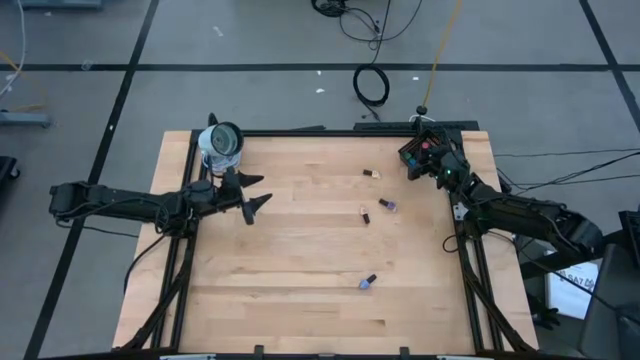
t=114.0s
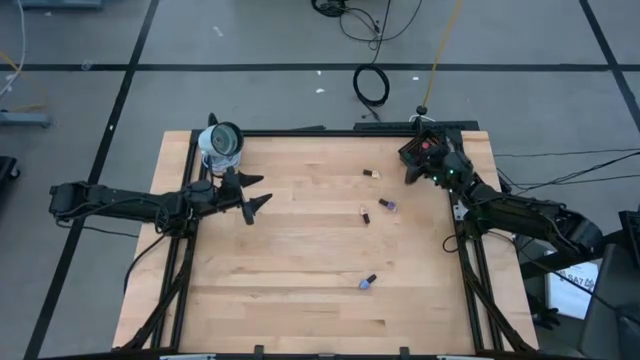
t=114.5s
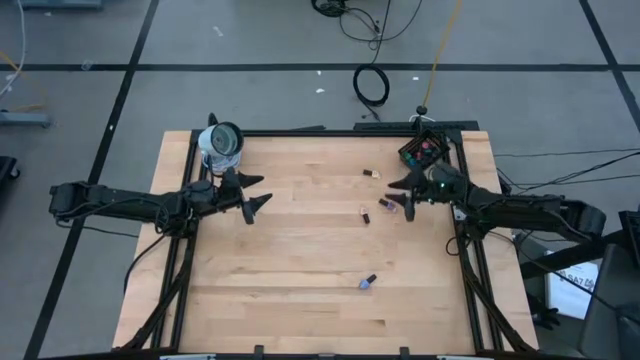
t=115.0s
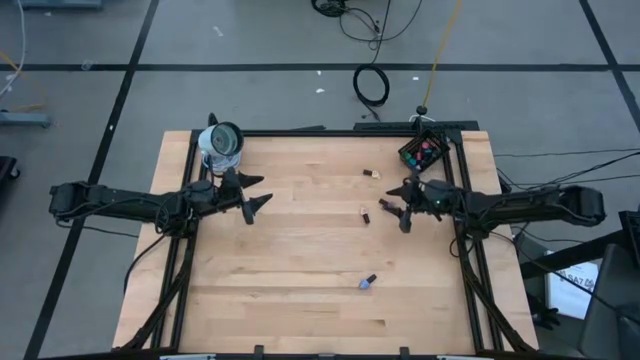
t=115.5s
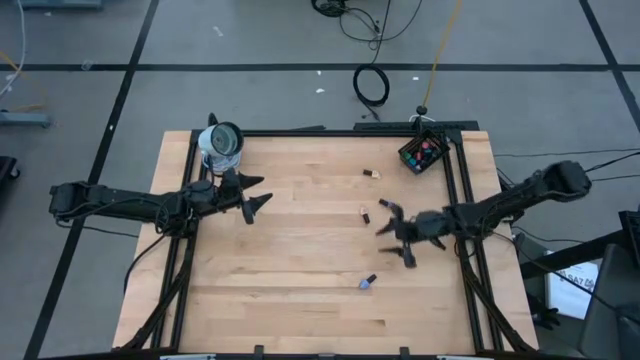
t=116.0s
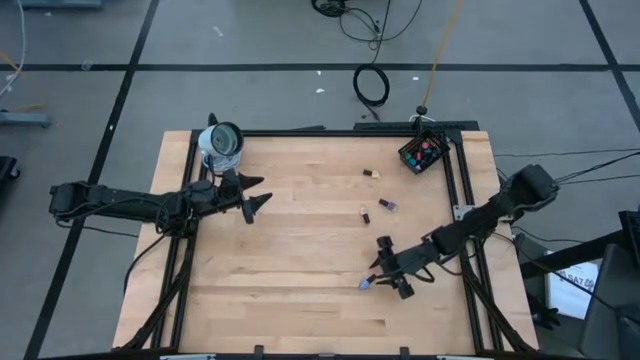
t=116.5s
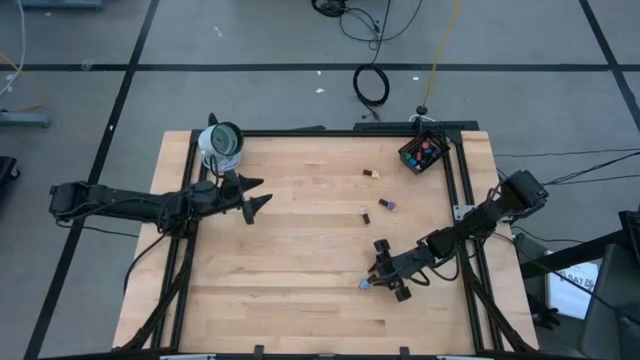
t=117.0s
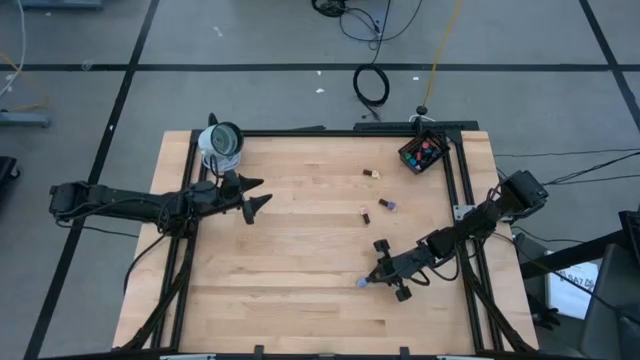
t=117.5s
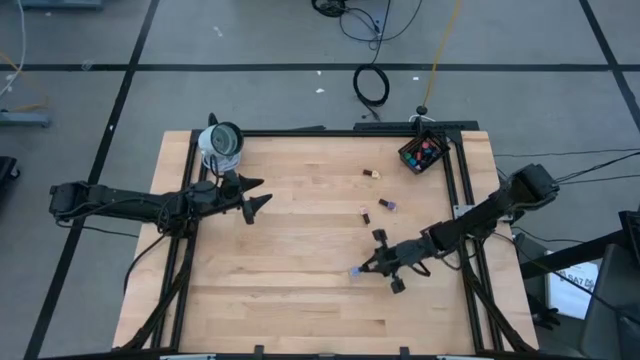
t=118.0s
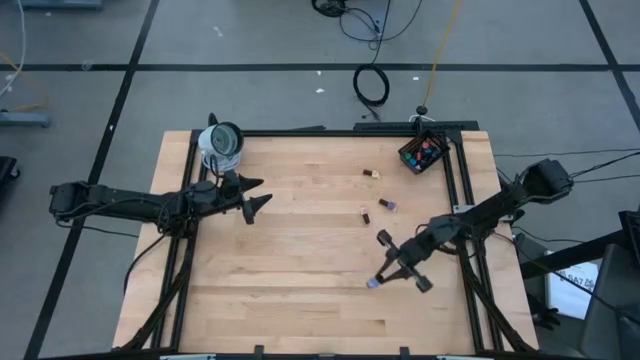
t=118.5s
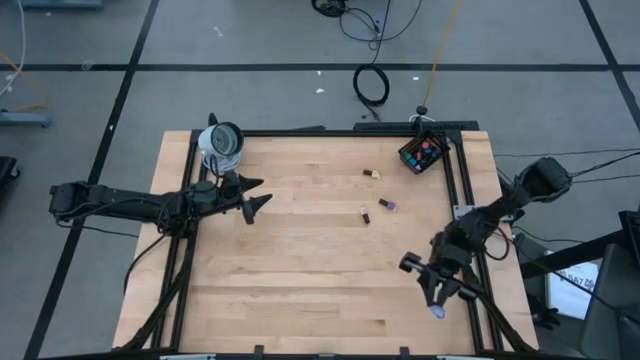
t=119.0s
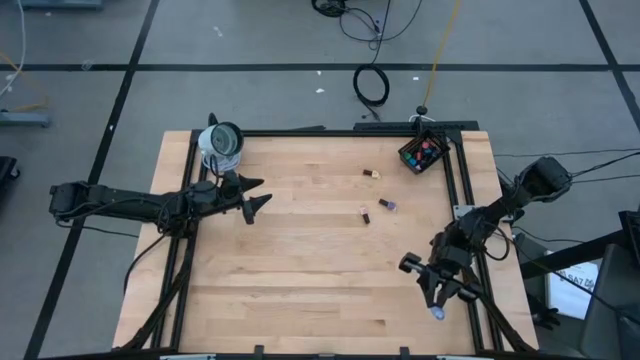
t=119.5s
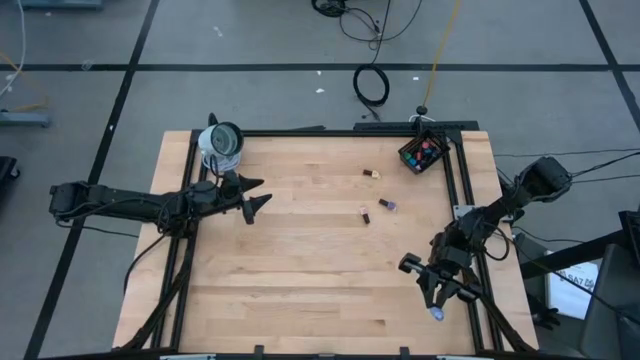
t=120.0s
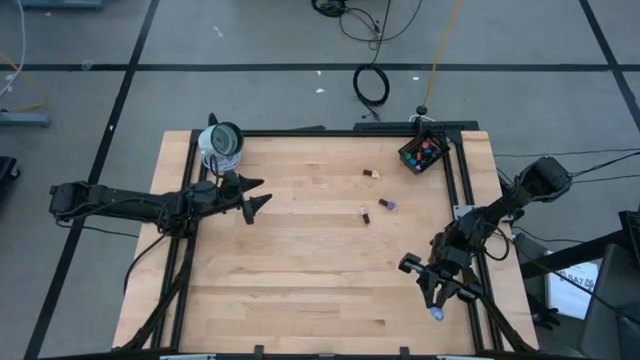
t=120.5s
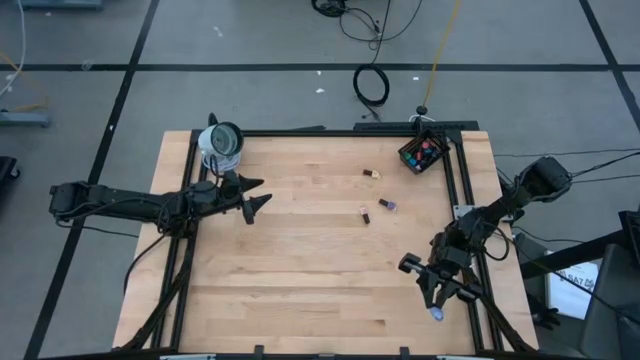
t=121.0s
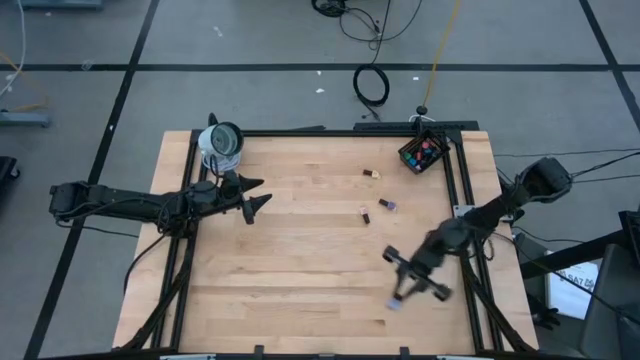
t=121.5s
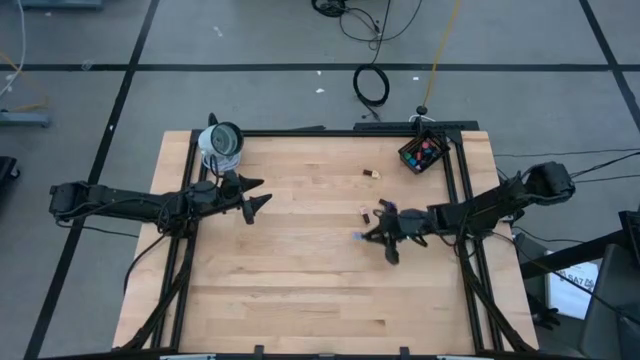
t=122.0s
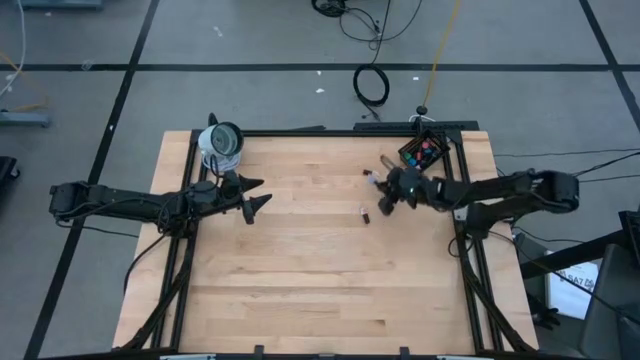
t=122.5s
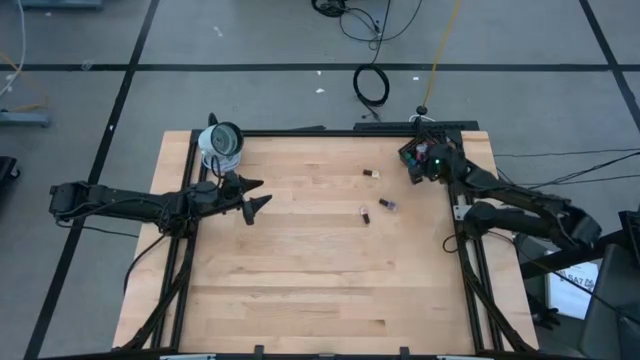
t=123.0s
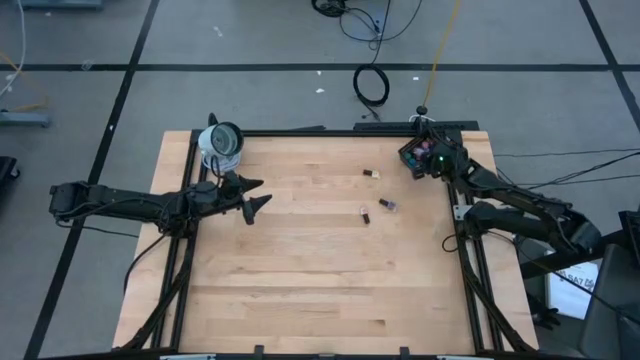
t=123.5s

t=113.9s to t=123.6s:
Task: Pick & Place Nail Polish
Put the light blue nail polish into the black bin

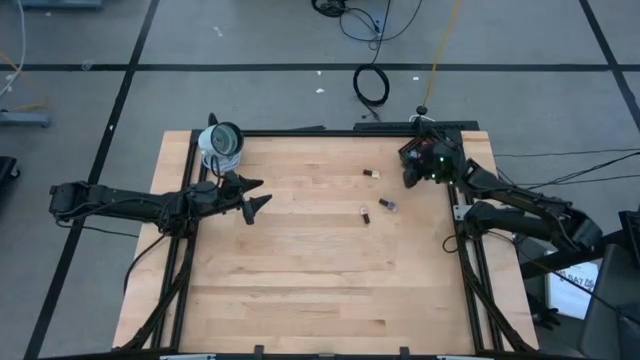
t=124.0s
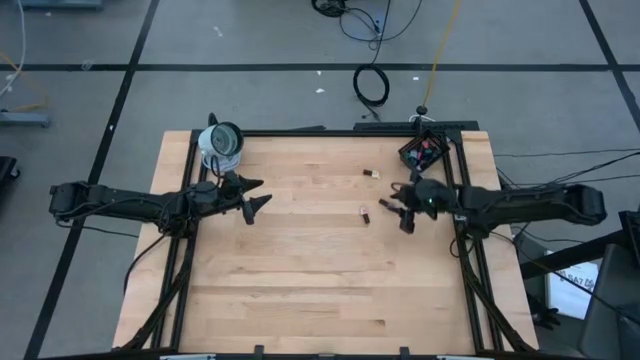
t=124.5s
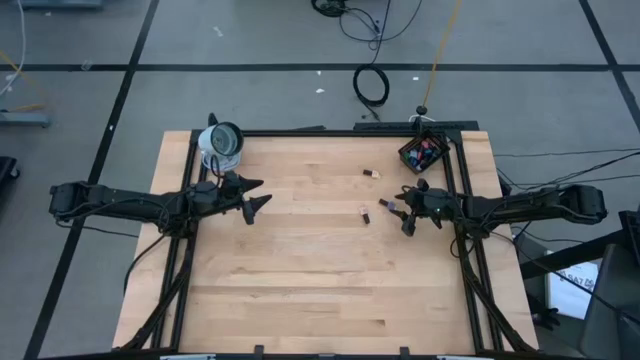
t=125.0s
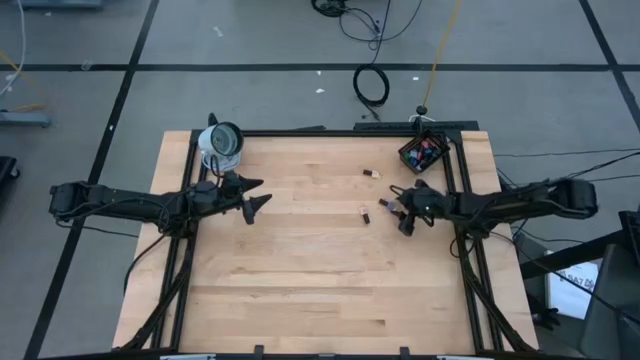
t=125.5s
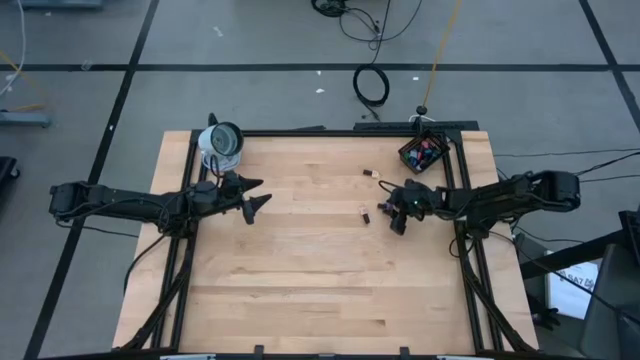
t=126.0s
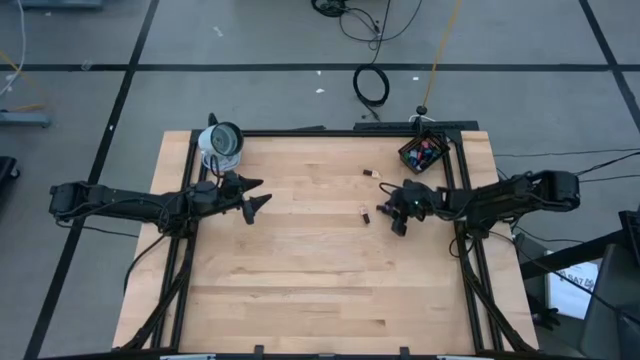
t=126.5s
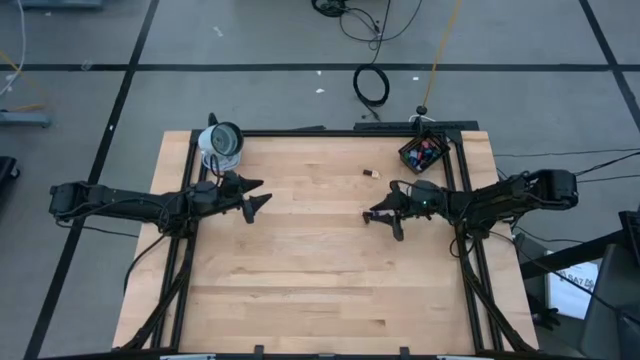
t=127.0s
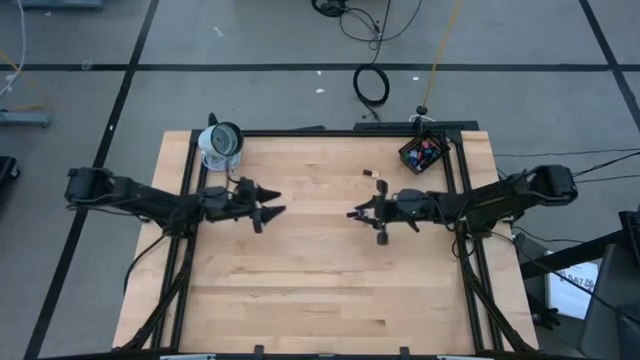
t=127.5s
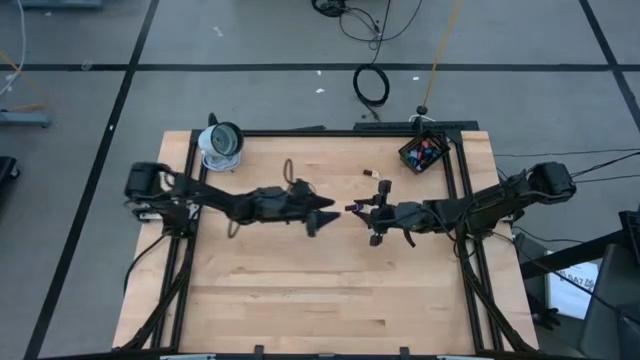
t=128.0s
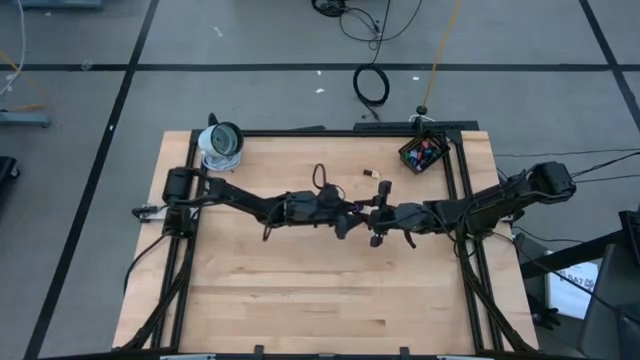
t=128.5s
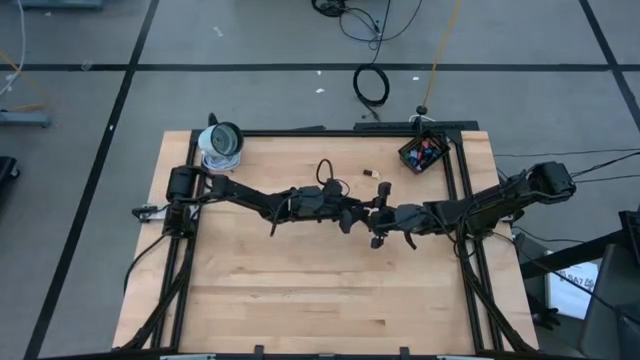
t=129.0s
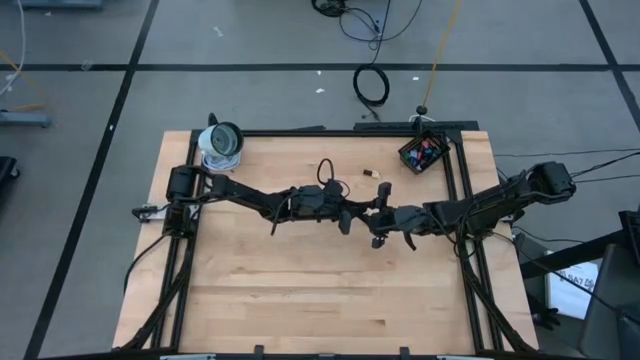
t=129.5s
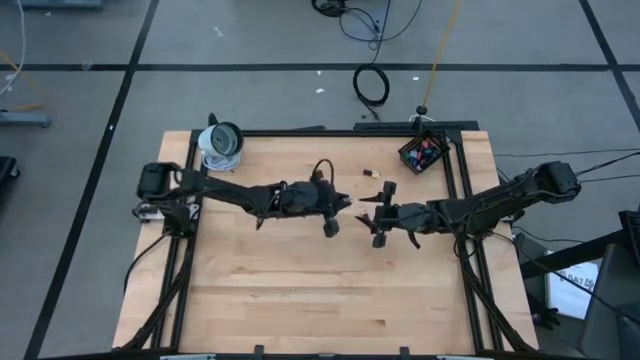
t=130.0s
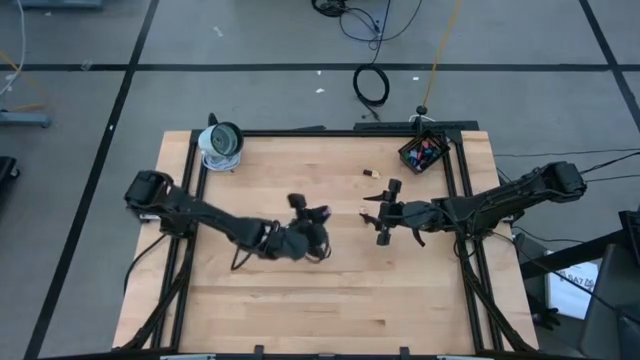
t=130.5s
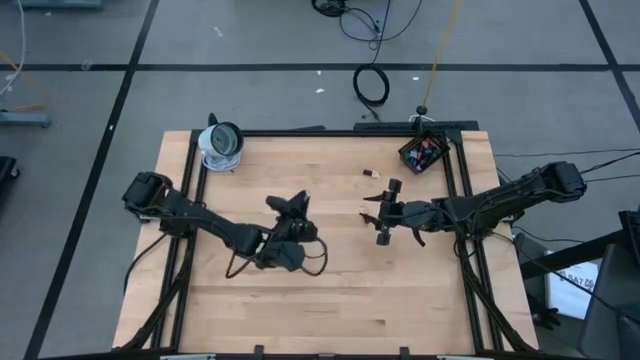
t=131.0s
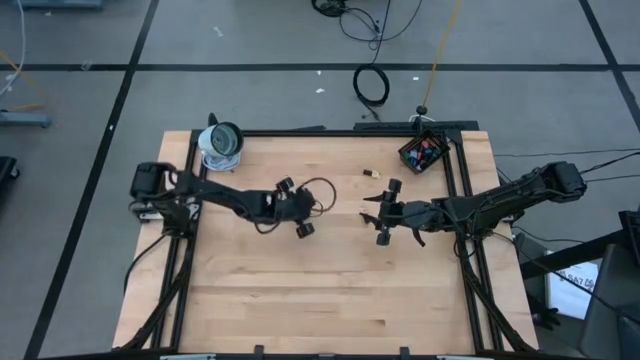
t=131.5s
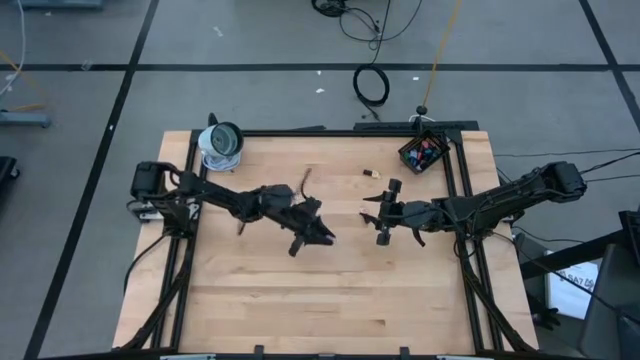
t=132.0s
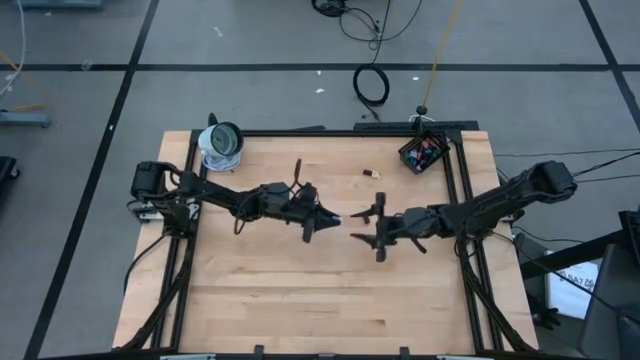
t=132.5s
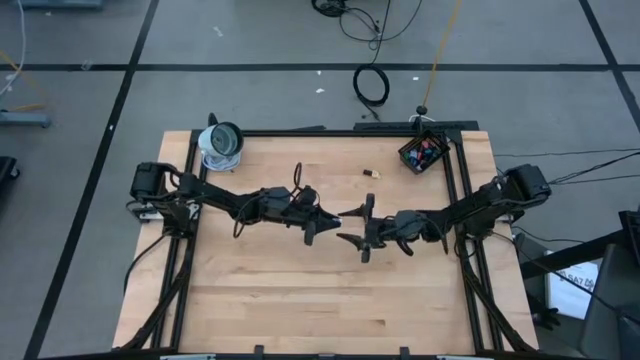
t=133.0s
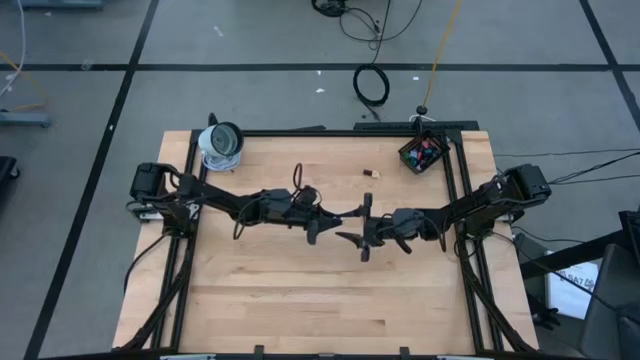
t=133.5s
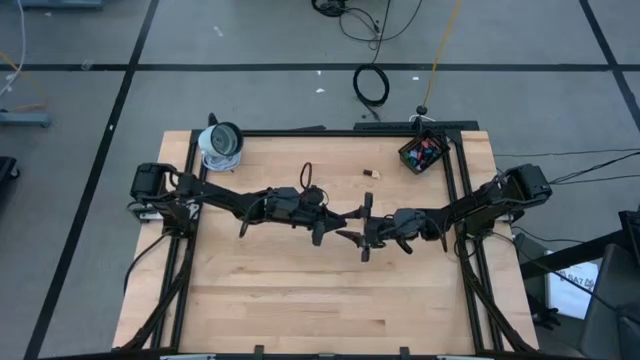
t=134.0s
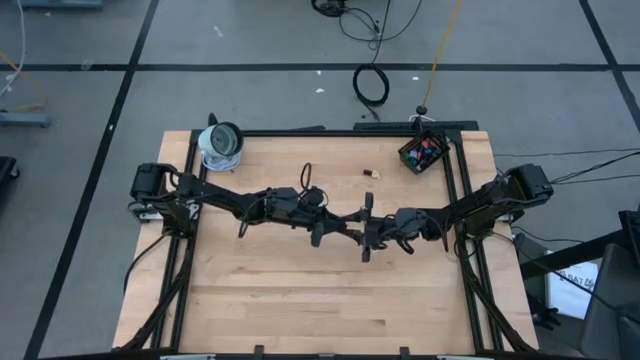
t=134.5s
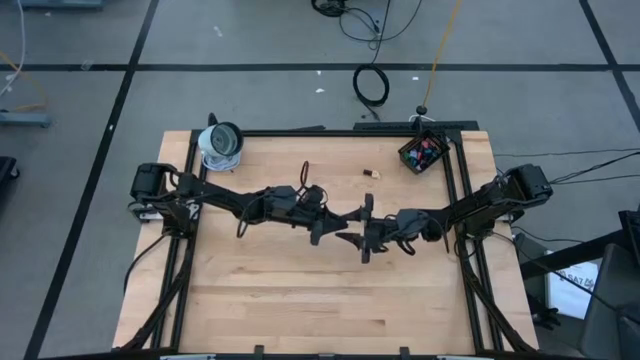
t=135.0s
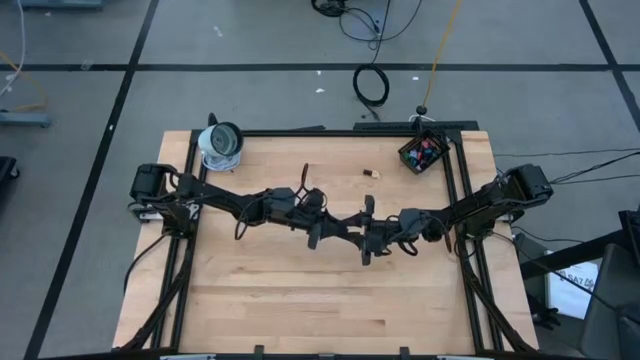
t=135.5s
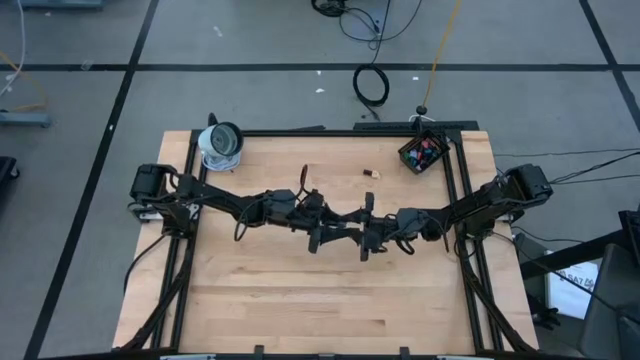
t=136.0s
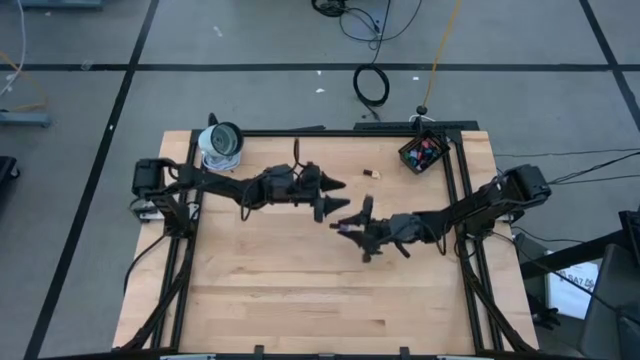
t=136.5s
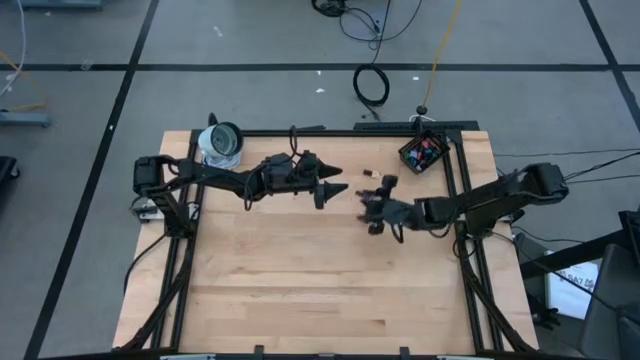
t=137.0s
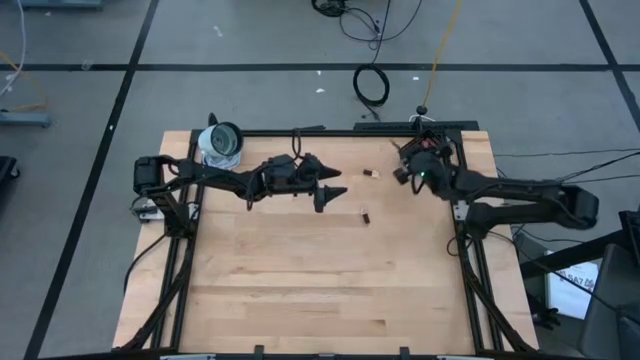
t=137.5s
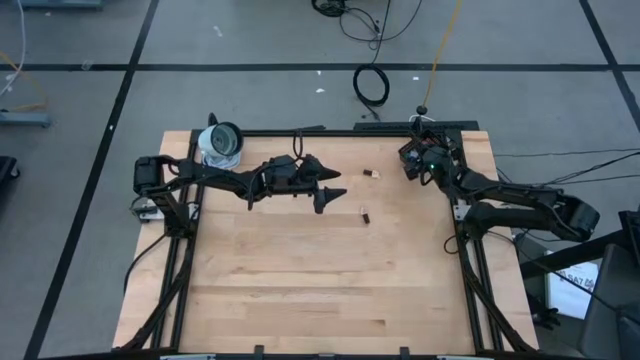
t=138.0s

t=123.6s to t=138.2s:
Put the purple nail polish into the black bin
